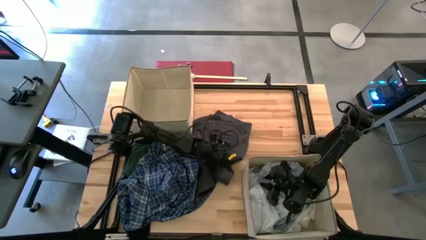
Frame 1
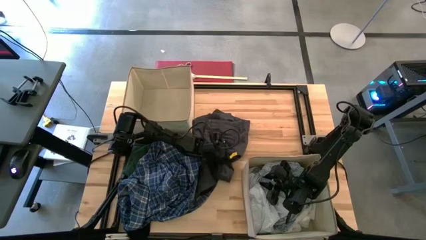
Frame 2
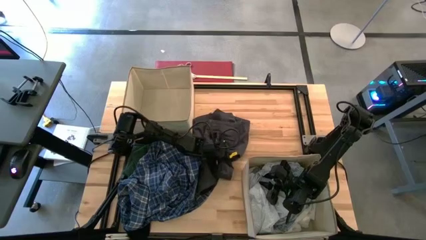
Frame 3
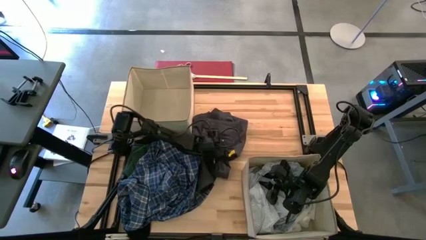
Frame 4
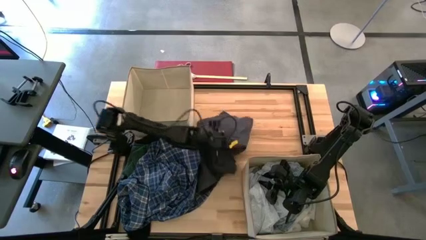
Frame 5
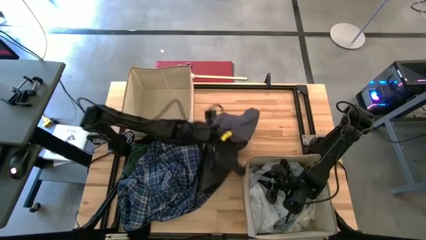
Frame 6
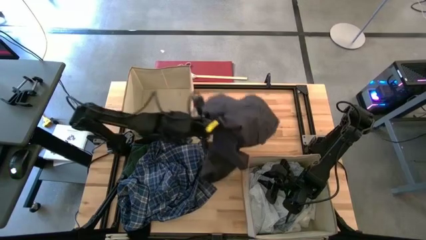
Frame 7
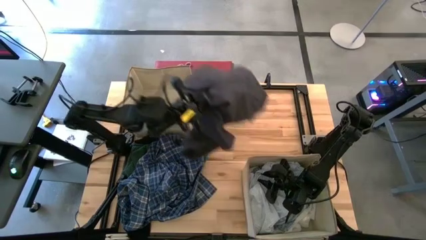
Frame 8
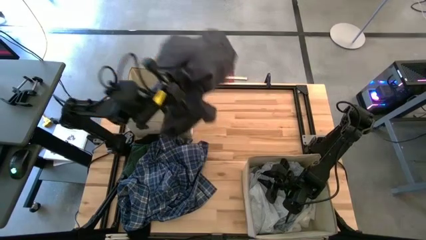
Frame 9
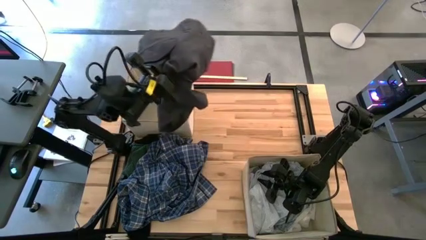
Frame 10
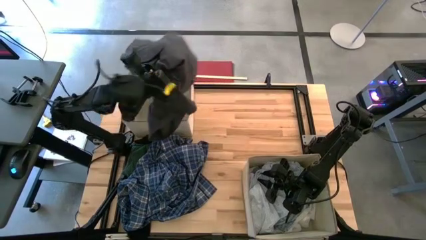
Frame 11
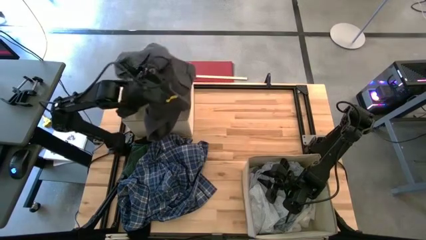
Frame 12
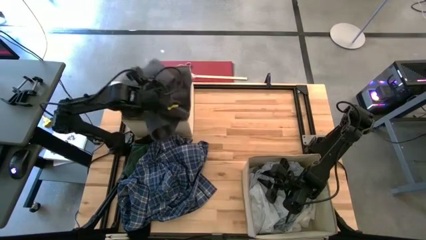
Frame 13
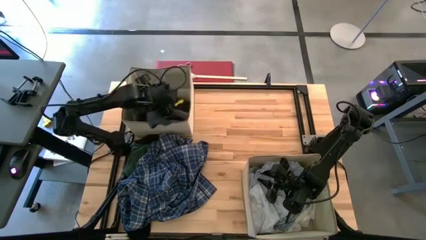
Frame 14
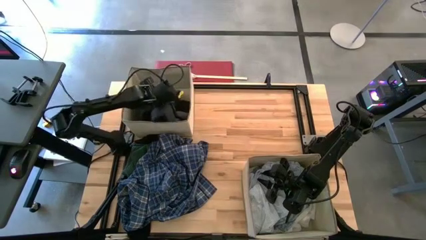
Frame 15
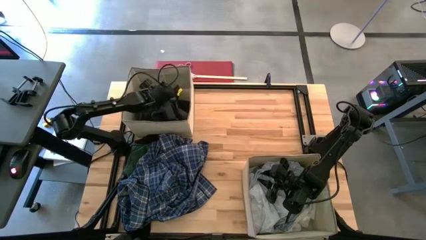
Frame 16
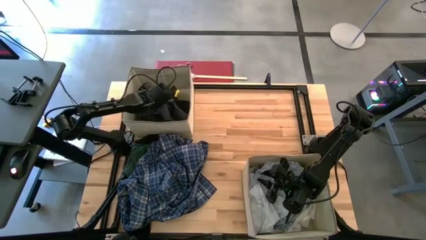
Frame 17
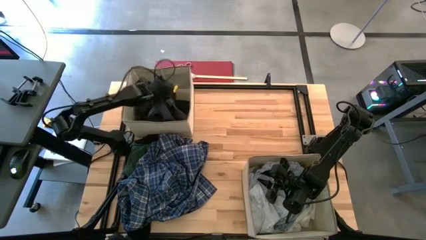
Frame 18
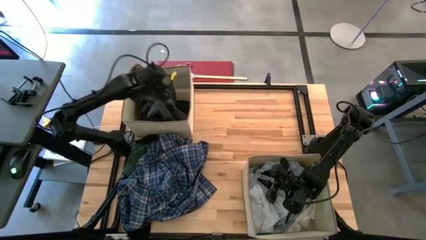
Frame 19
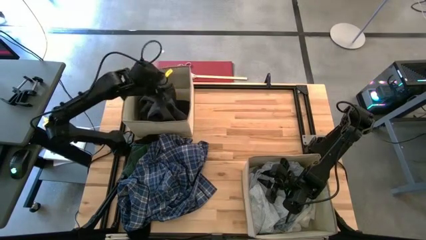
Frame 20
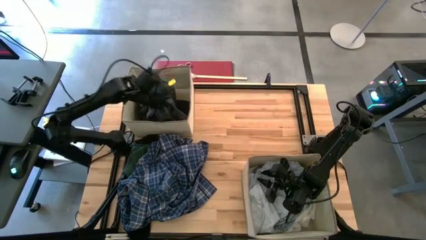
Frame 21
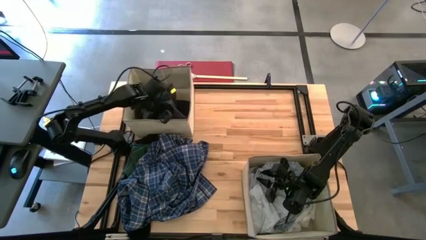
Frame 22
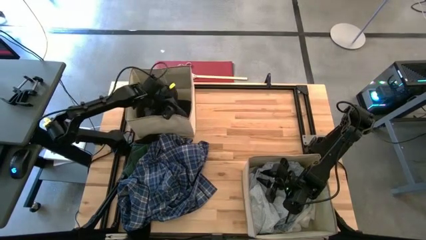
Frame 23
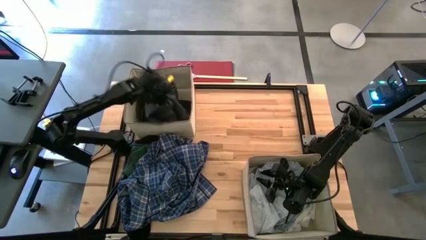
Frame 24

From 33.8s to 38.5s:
Task: Sort clothes
Put the brown pants into the top laundry bin

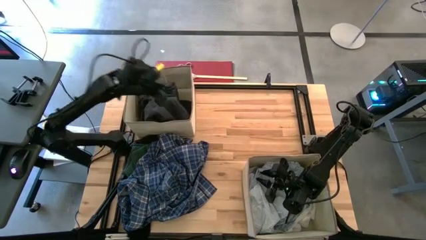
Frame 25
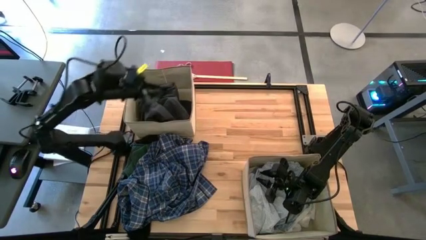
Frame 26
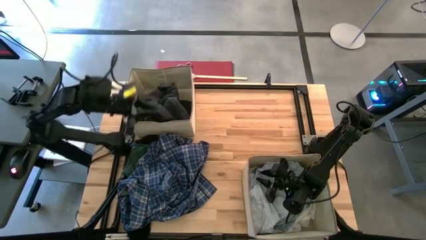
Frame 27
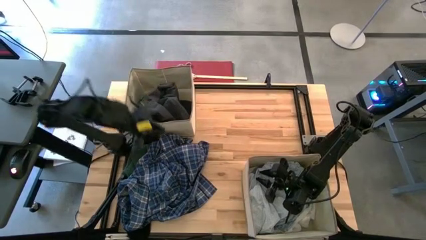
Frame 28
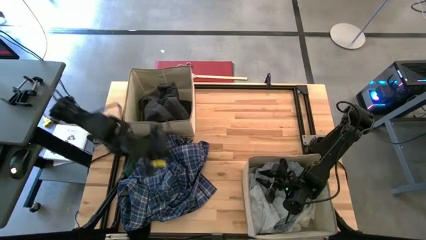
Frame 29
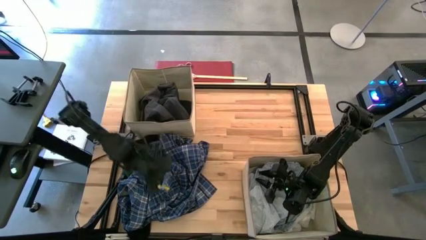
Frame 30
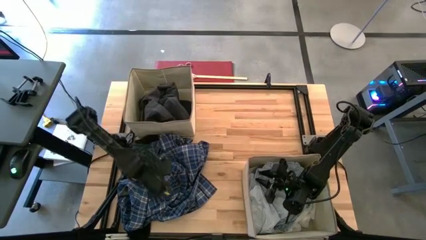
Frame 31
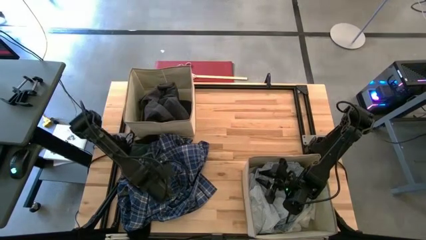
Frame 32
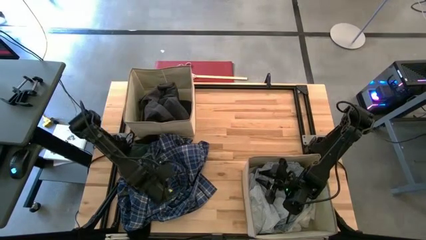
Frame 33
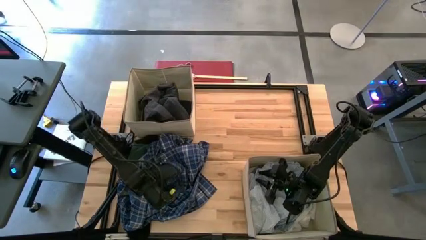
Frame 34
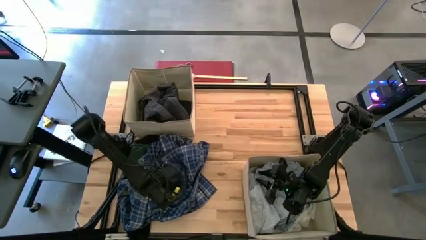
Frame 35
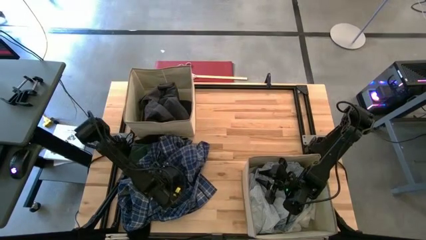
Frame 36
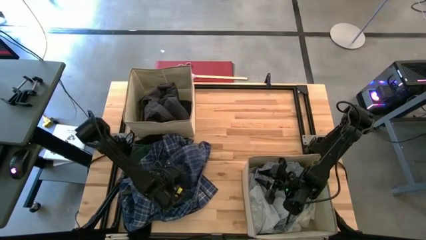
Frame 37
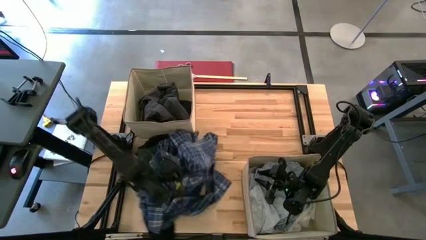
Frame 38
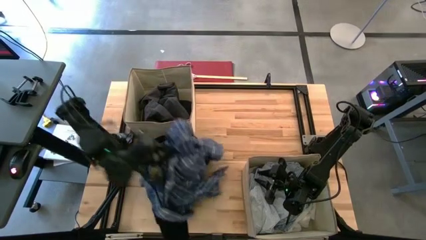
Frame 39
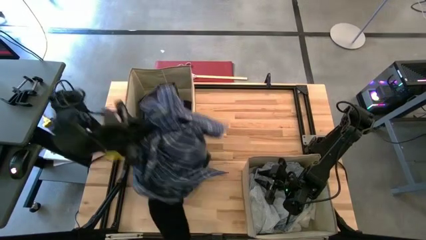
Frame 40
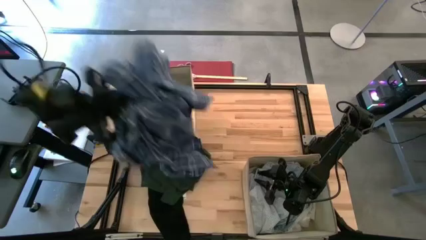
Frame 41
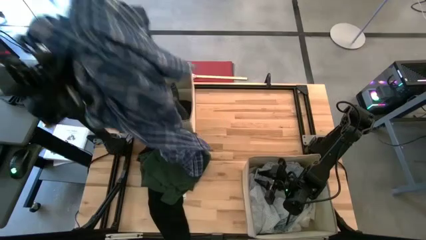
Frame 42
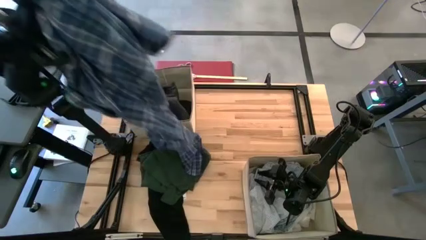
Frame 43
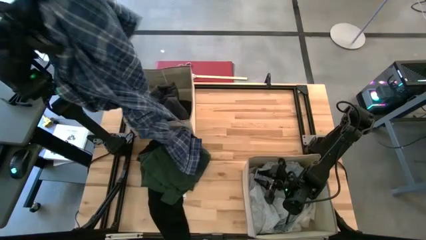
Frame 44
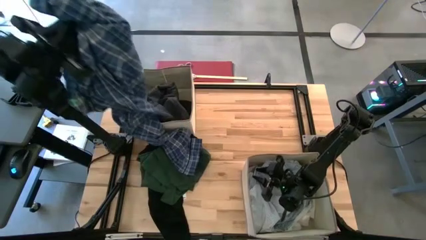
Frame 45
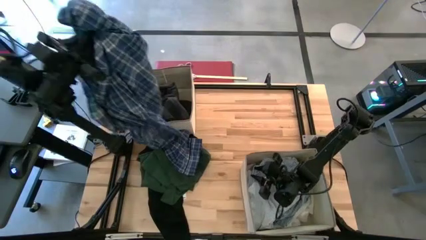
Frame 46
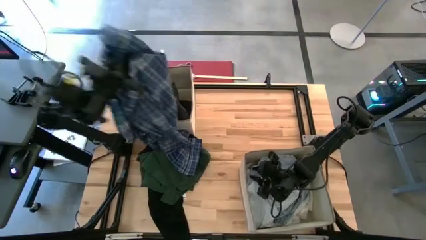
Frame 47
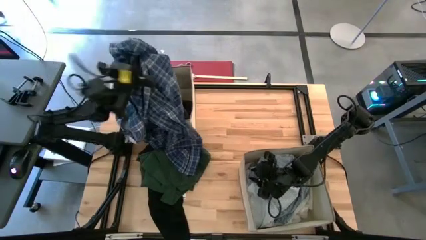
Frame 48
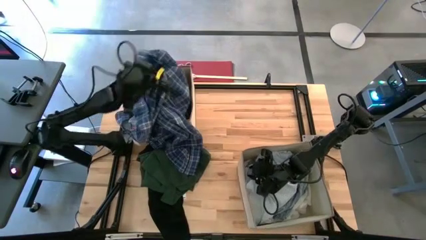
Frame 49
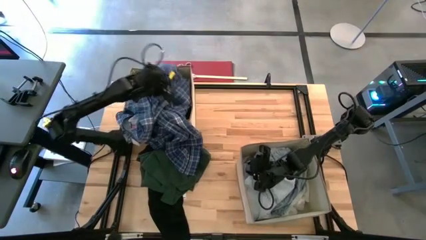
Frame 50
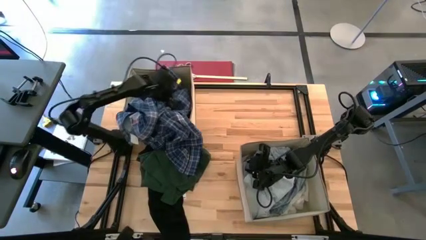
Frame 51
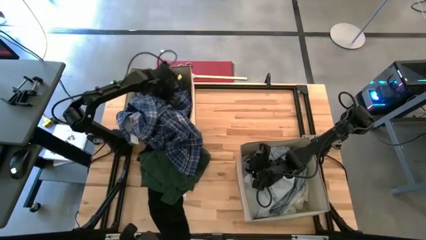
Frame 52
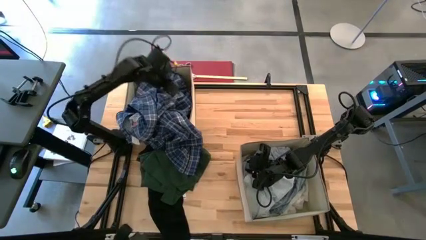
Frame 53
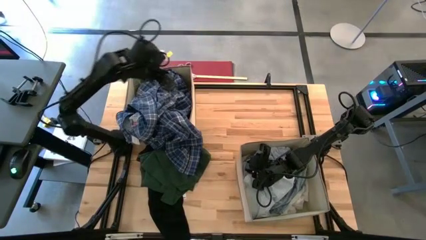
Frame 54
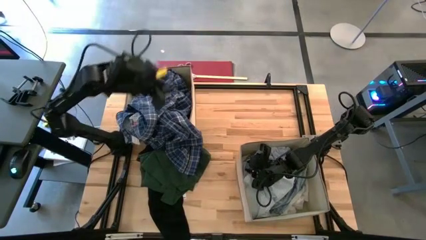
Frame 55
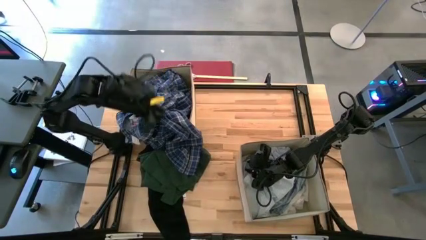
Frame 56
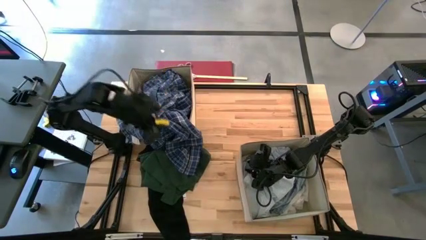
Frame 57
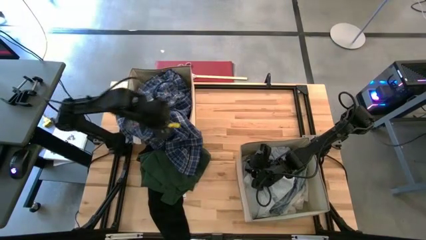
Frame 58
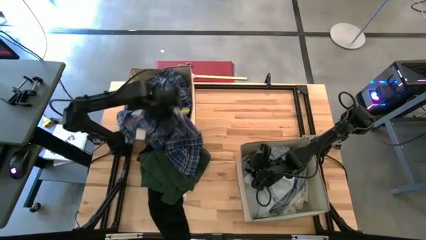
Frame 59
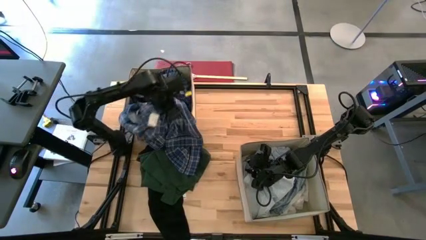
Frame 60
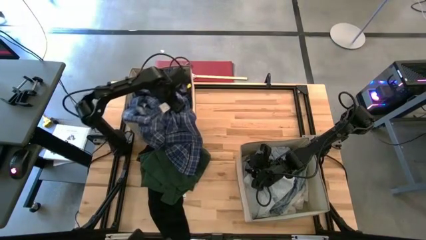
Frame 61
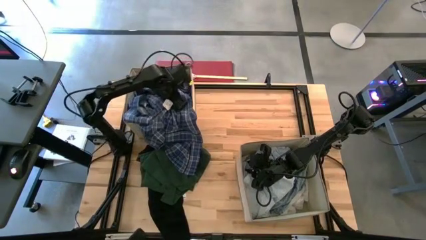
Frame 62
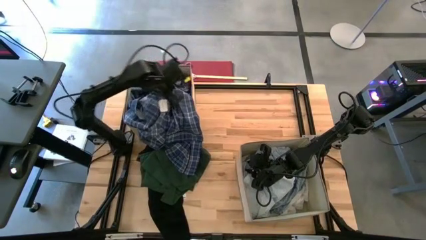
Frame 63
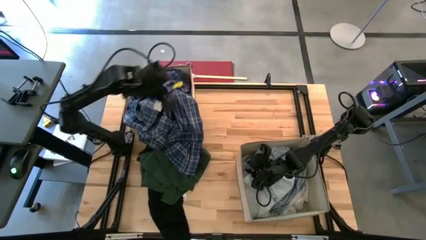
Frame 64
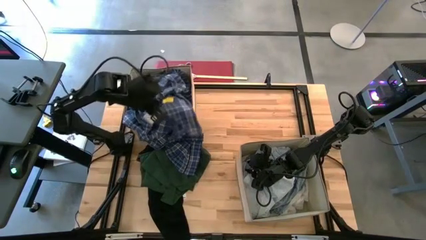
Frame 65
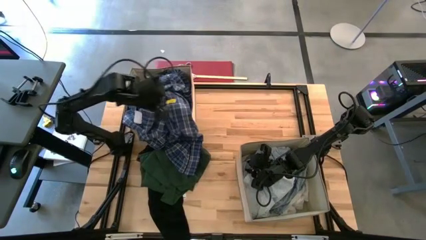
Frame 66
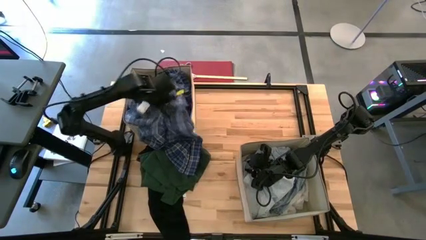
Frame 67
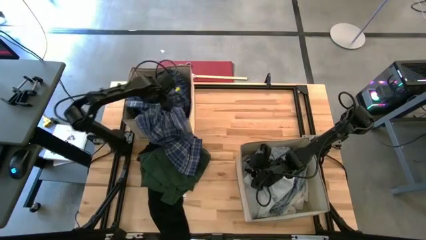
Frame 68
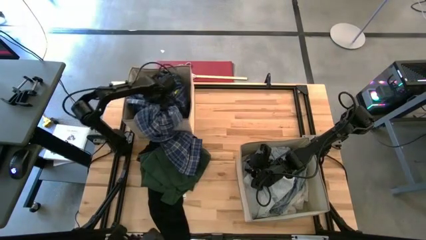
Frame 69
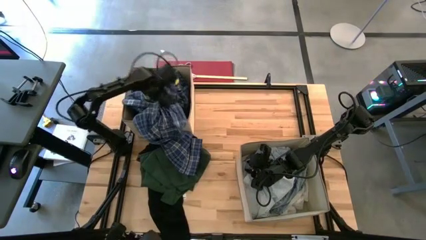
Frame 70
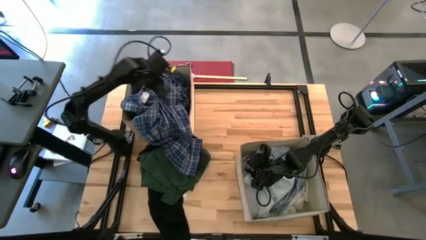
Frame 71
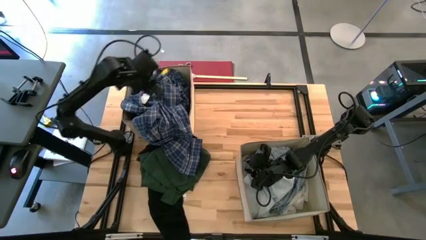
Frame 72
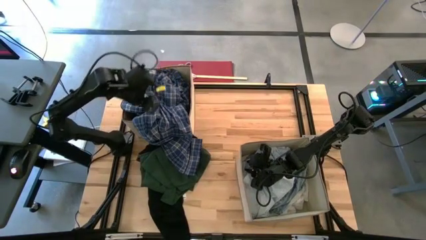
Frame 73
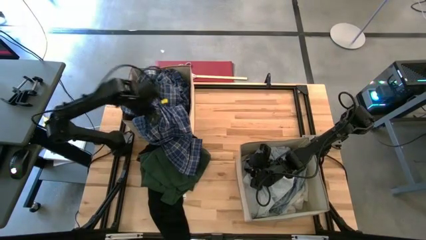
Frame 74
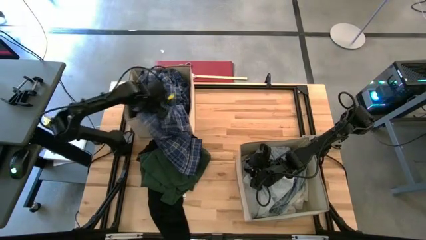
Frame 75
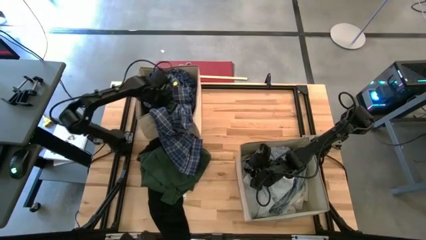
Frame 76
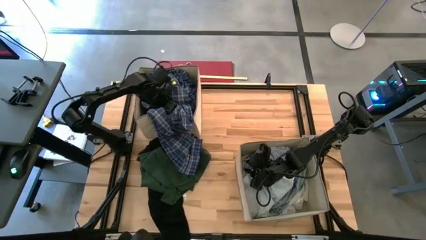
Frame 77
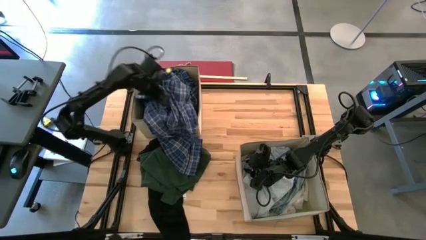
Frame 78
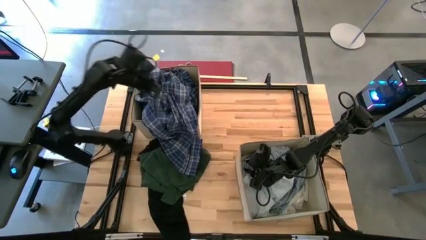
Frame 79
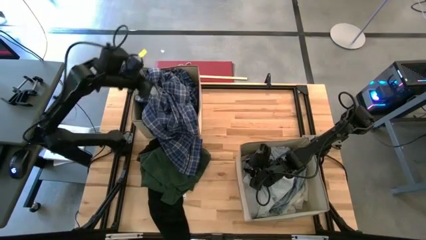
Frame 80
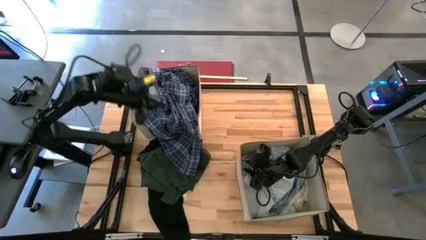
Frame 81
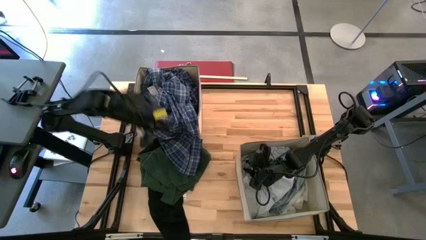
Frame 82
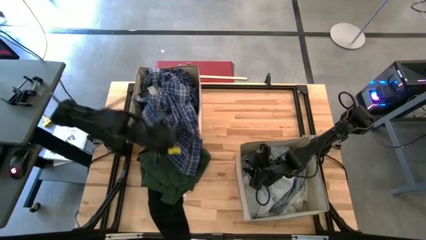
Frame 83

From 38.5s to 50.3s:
Put the blue shirt into the top laundry bin
